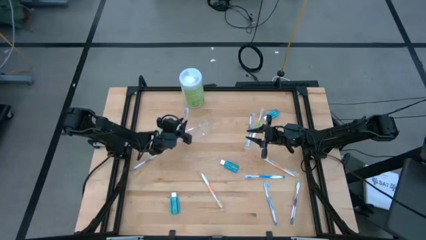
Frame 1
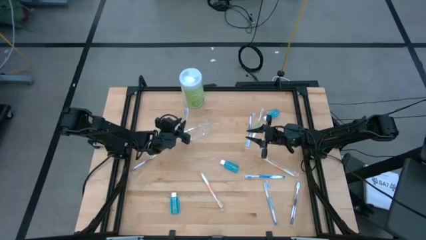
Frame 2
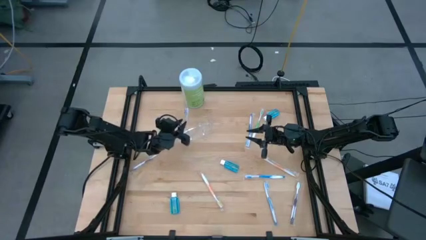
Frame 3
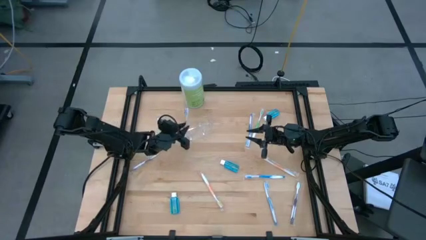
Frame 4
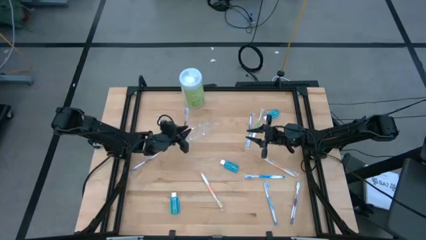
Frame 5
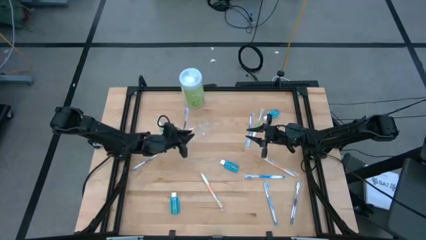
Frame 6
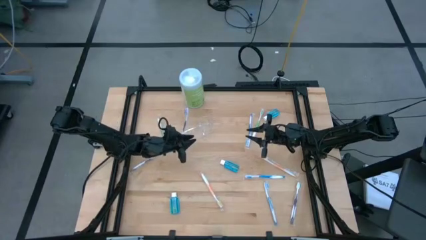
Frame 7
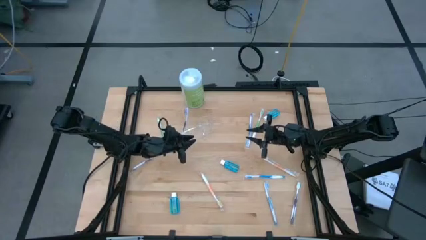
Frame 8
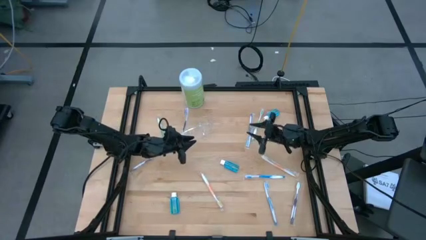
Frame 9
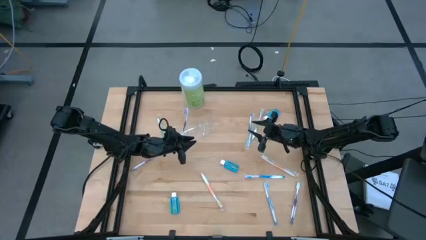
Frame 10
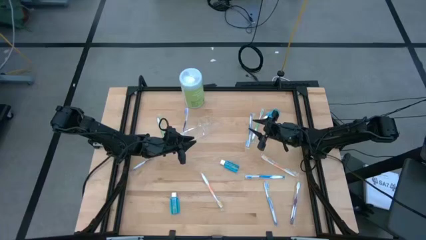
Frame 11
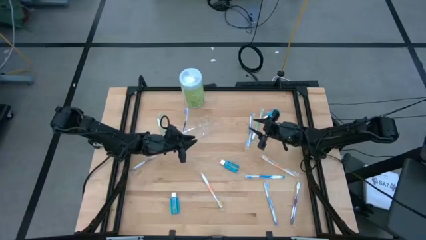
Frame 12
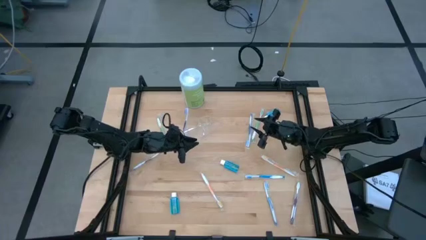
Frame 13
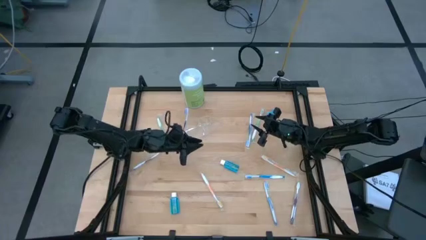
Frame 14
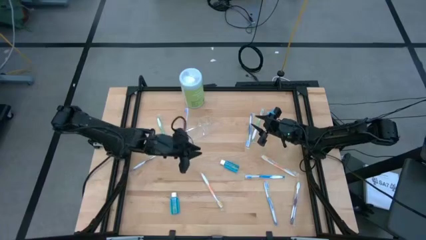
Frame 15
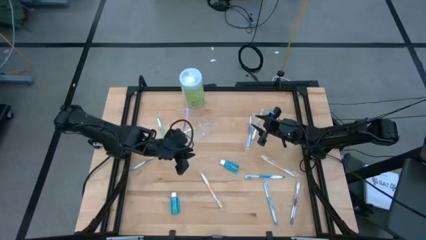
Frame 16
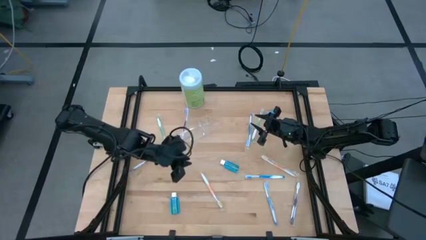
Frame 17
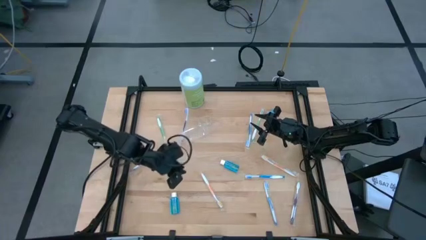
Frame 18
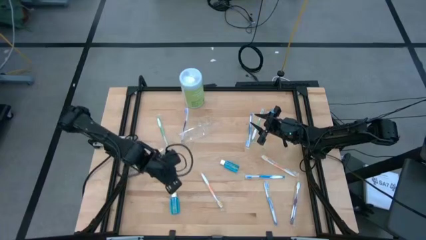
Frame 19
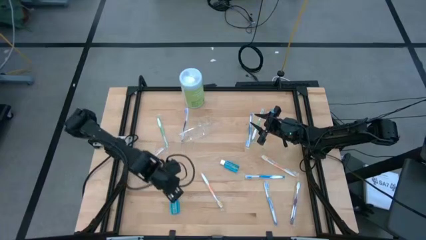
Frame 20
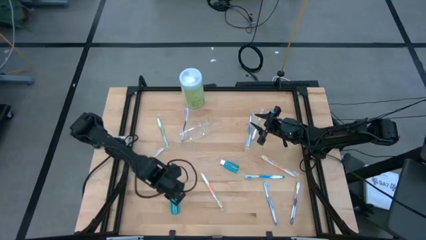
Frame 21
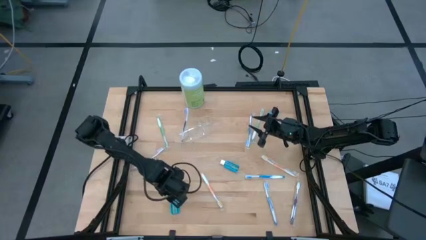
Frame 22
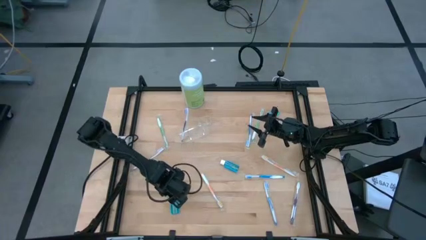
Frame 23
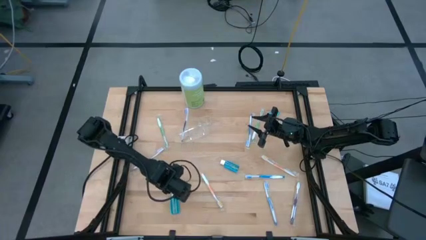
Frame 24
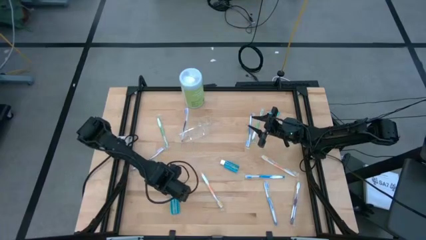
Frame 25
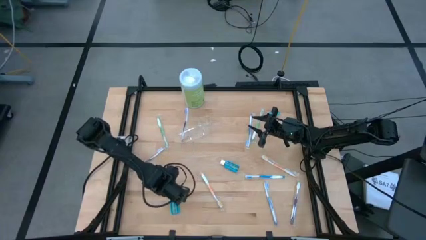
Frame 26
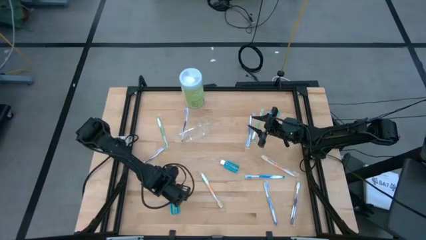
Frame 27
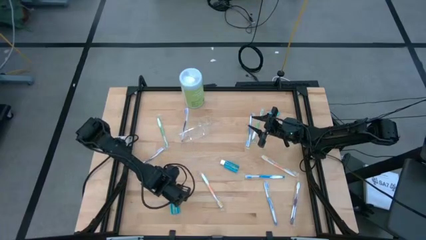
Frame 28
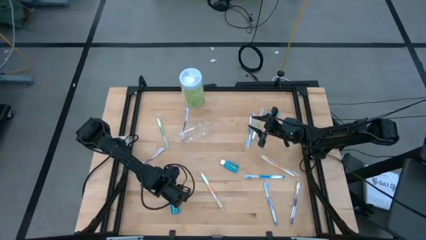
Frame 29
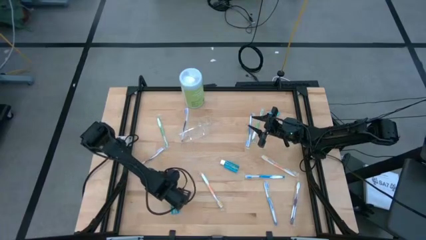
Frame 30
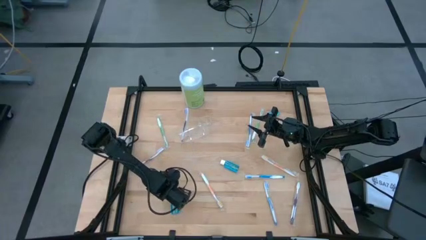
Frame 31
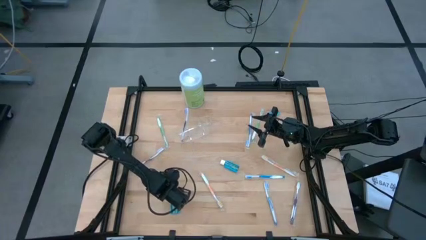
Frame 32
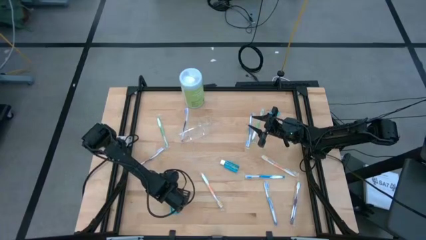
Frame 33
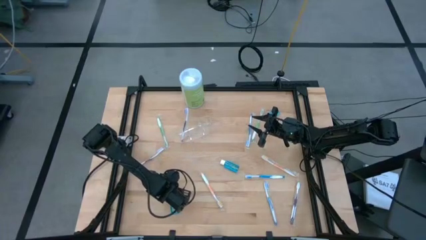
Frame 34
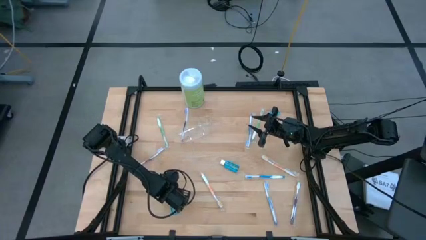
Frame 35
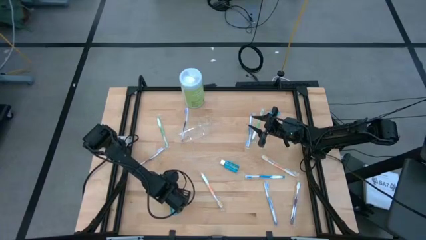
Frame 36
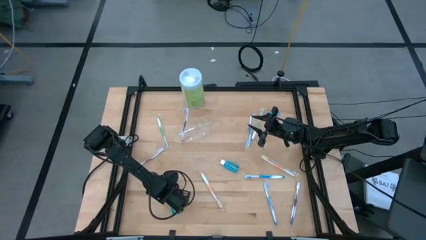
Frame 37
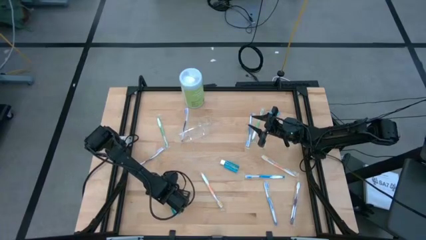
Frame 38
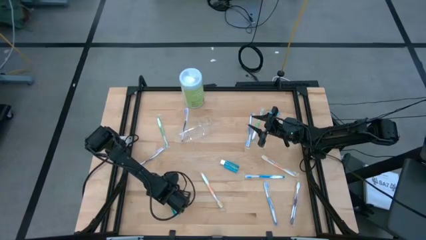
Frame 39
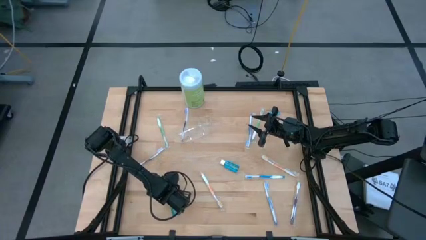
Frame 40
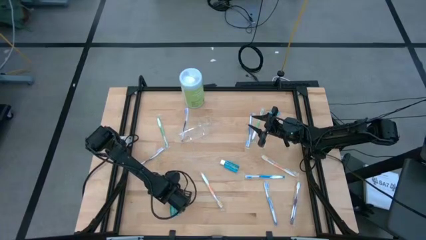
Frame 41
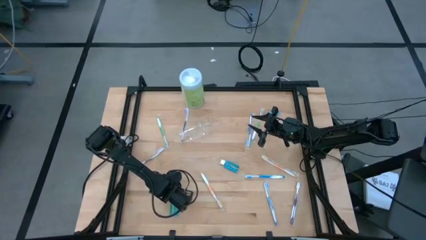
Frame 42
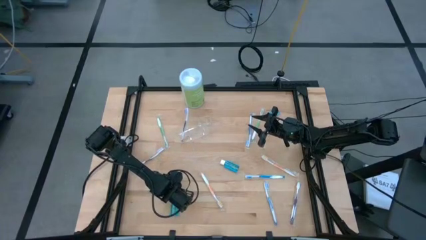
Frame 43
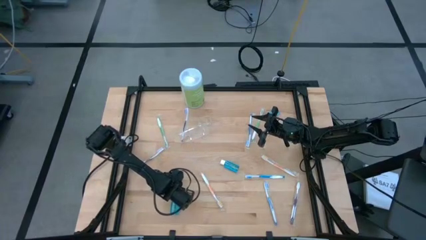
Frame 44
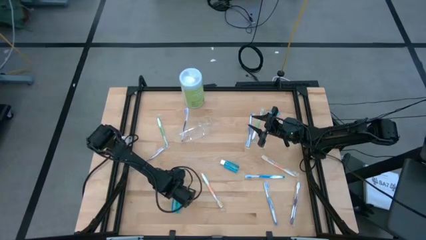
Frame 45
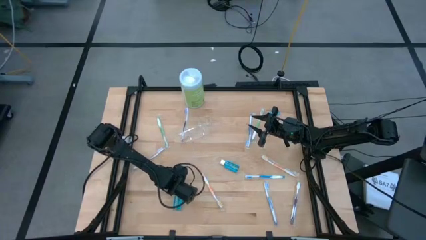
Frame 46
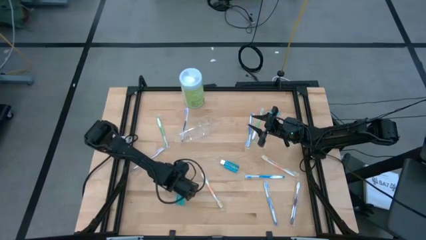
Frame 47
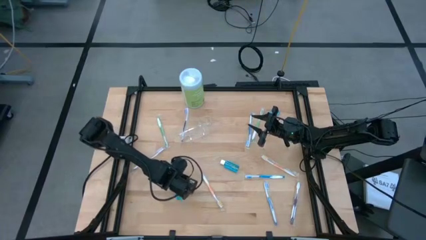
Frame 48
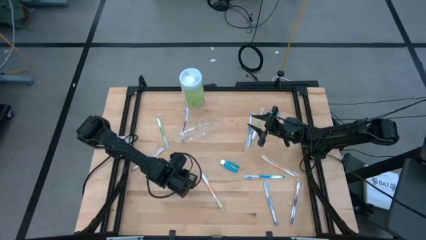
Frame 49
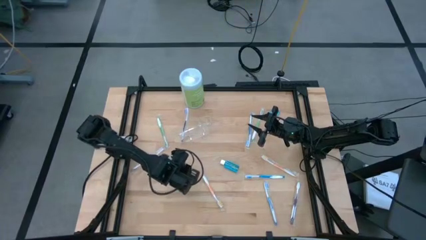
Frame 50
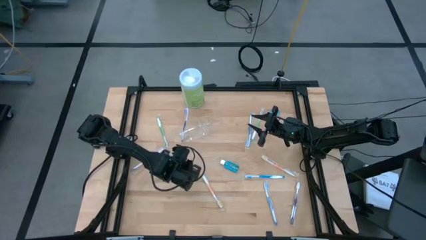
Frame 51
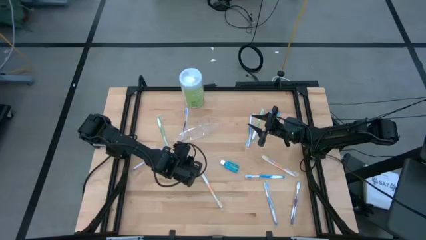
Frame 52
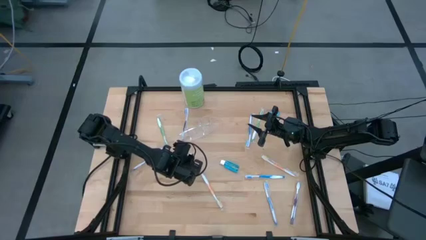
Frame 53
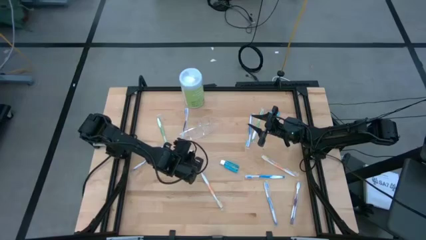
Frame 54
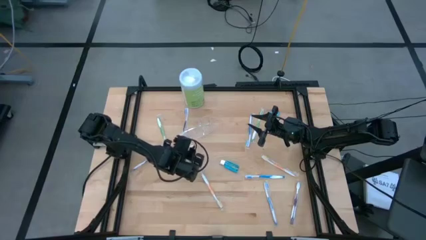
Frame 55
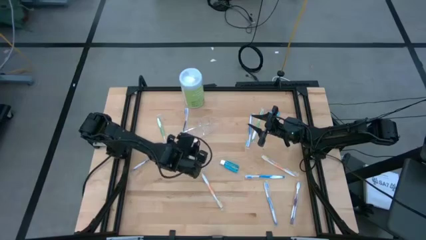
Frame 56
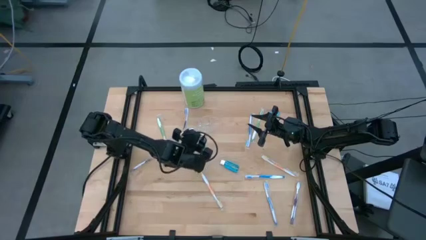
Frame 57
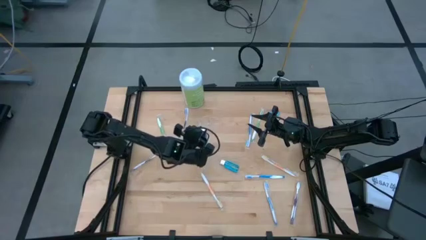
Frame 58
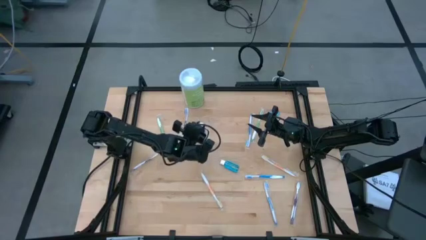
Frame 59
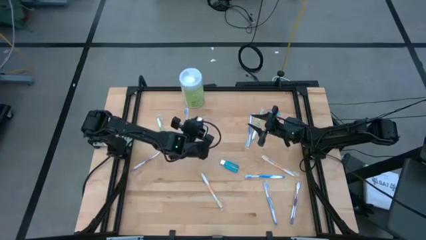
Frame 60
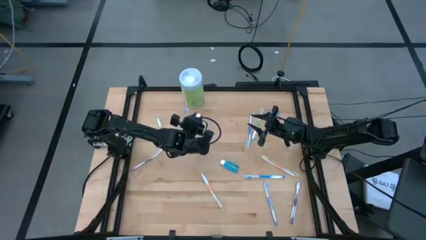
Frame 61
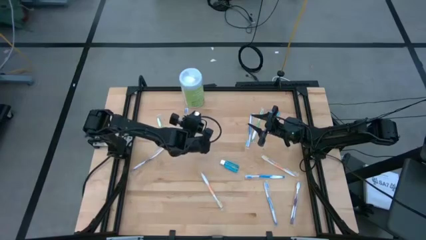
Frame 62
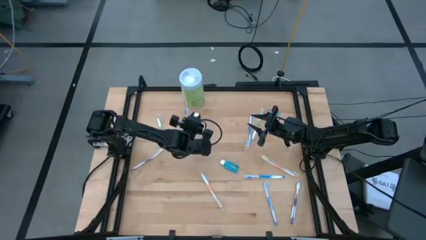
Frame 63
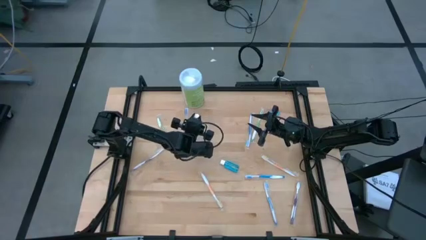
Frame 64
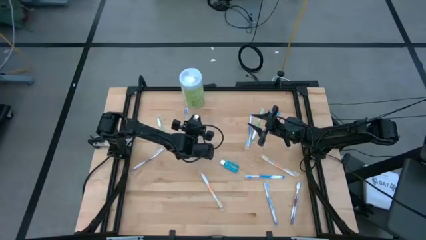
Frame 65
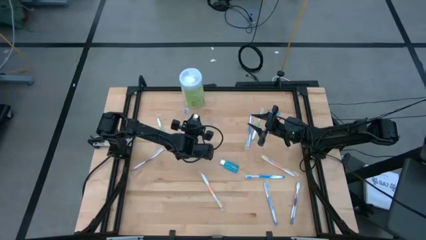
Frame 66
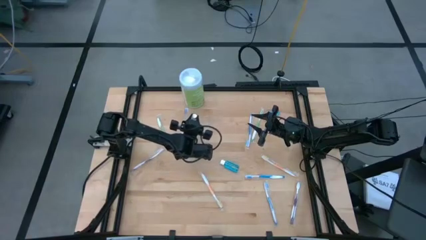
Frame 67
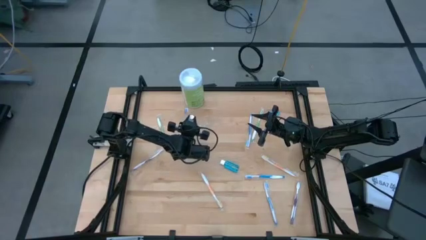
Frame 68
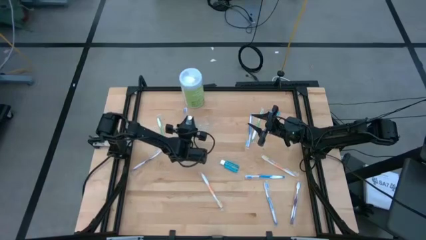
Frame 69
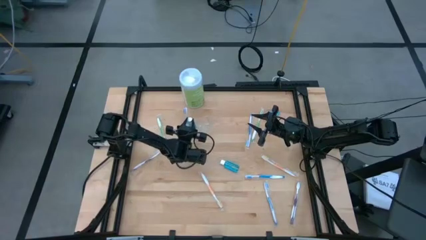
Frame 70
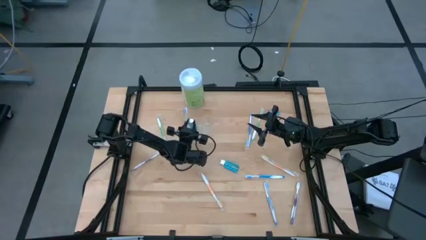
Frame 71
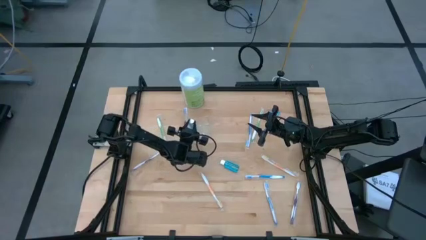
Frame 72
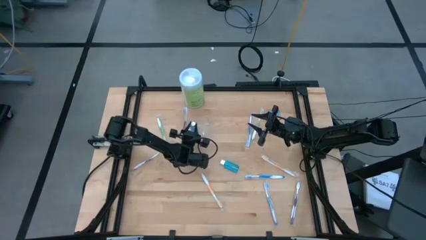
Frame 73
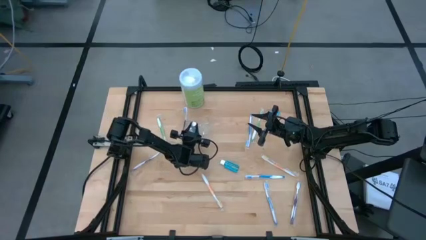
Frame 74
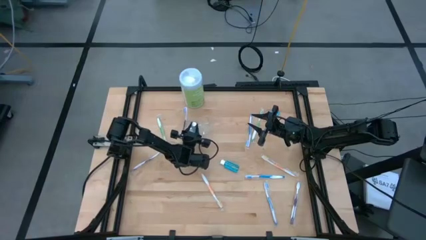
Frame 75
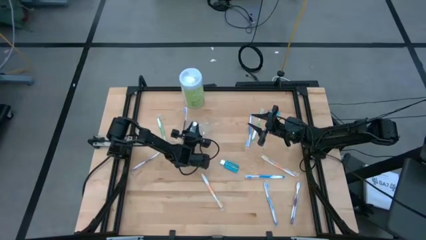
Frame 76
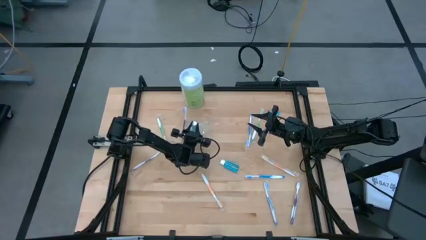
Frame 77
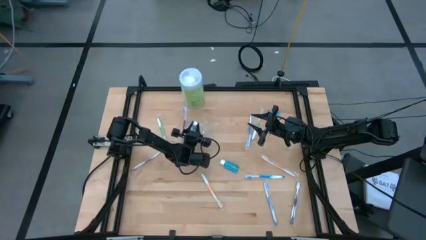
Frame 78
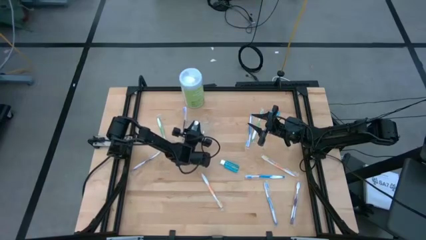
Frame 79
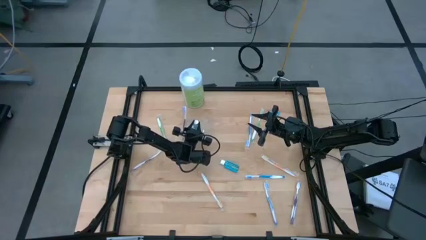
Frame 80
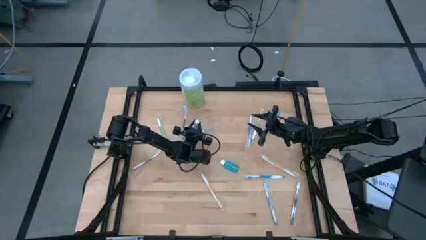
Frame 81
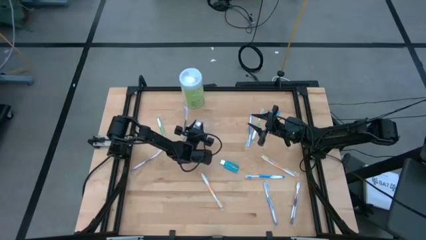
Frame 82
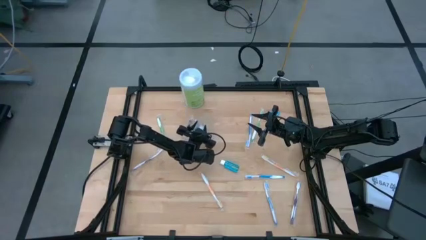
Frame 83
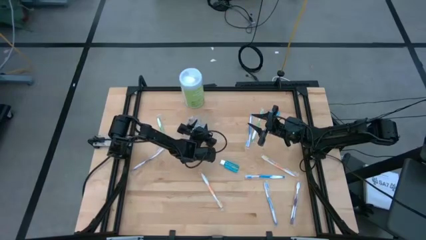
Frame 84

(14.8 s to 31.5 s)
Task: Pick & Place toothbrushing station
Put the bottom blue mouthwash into the transparent organizer
